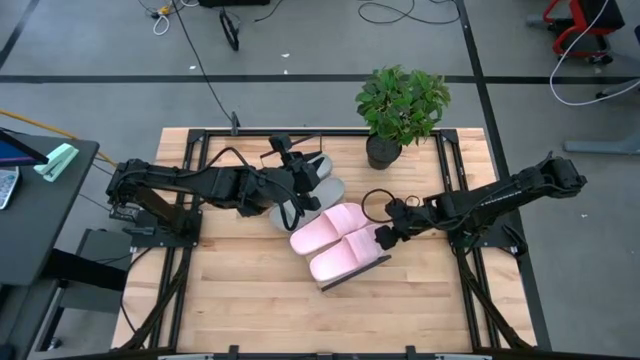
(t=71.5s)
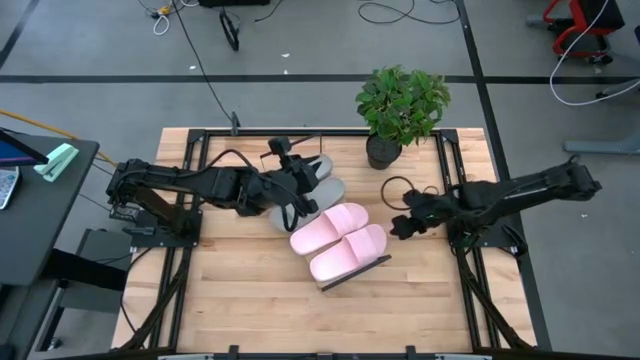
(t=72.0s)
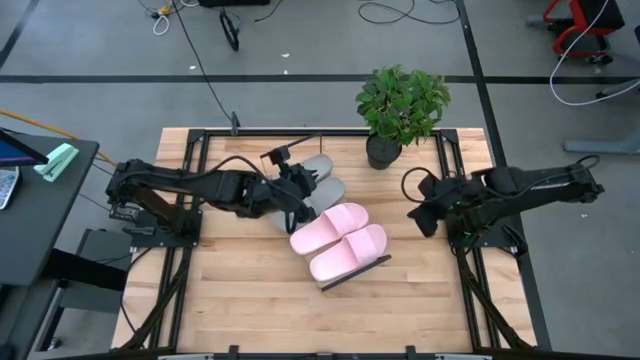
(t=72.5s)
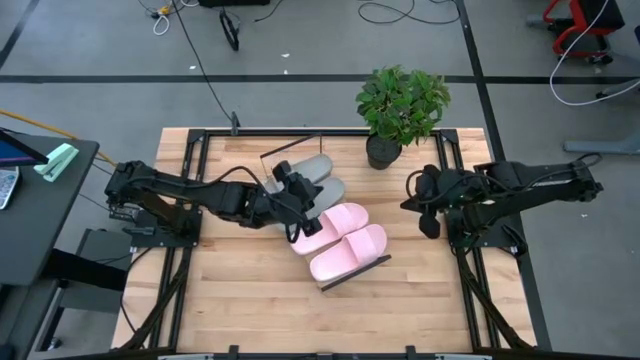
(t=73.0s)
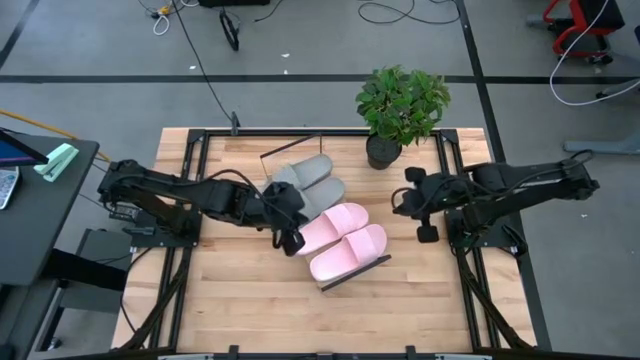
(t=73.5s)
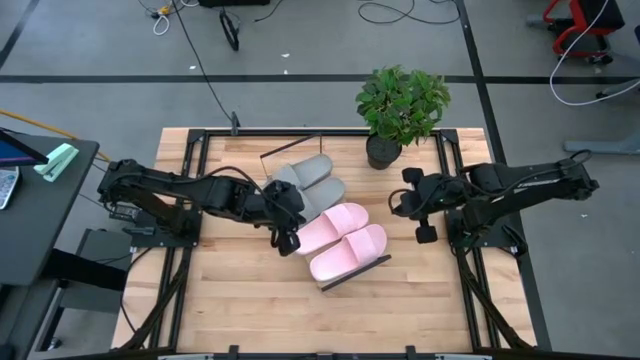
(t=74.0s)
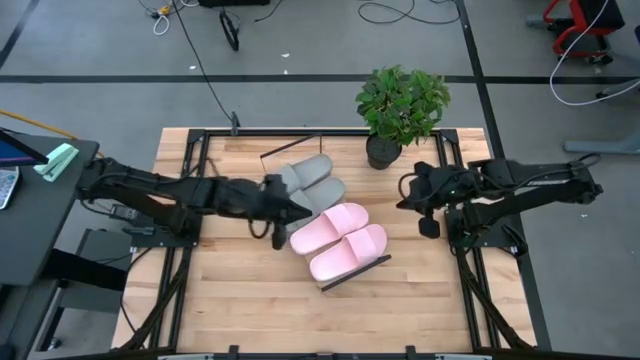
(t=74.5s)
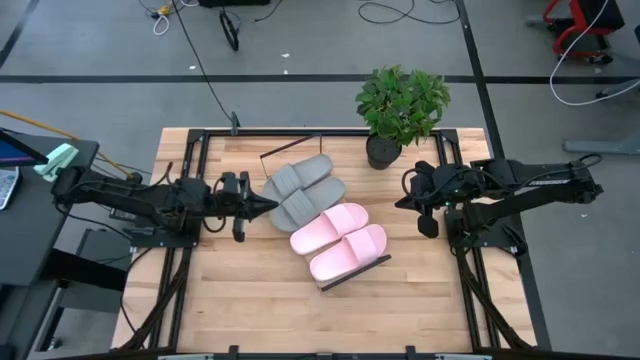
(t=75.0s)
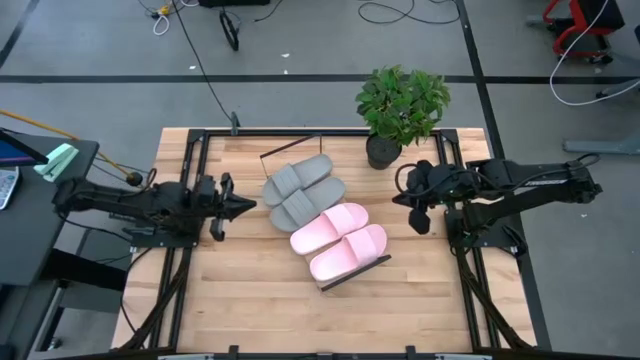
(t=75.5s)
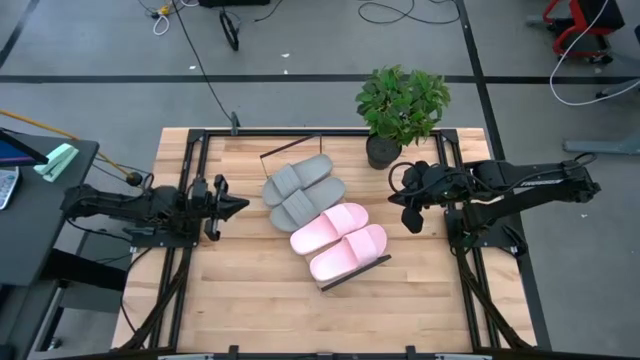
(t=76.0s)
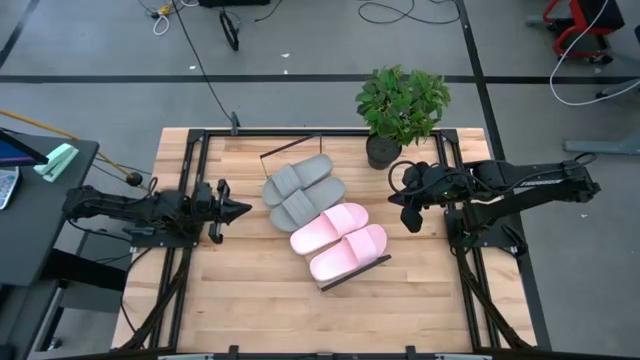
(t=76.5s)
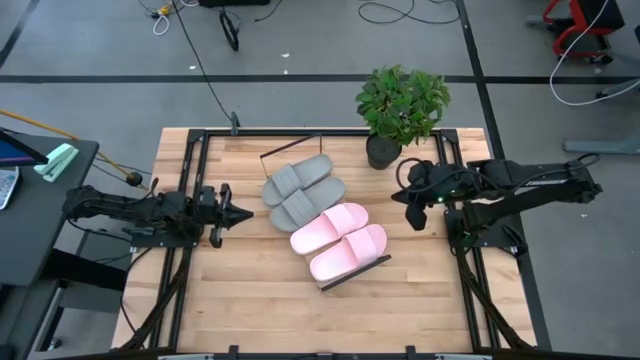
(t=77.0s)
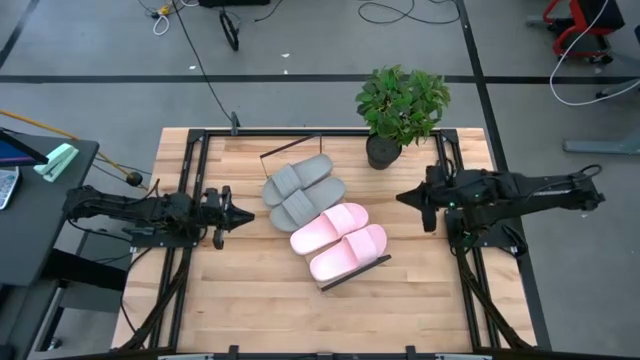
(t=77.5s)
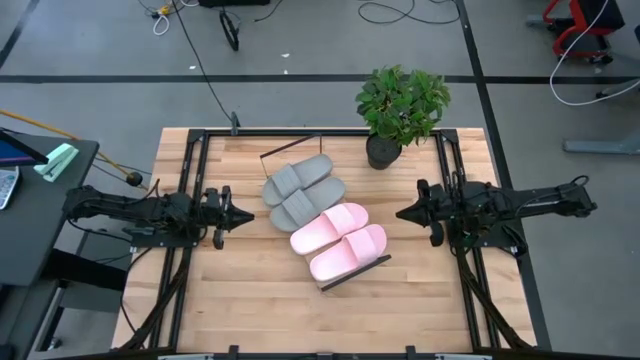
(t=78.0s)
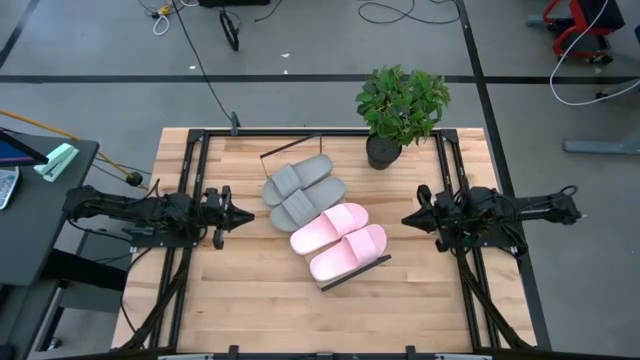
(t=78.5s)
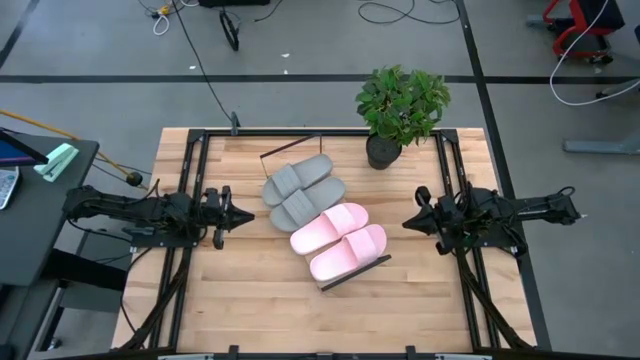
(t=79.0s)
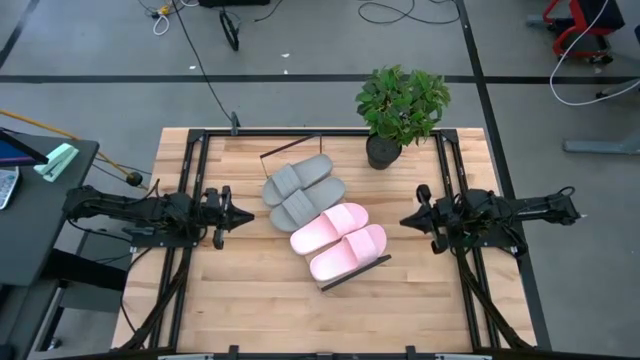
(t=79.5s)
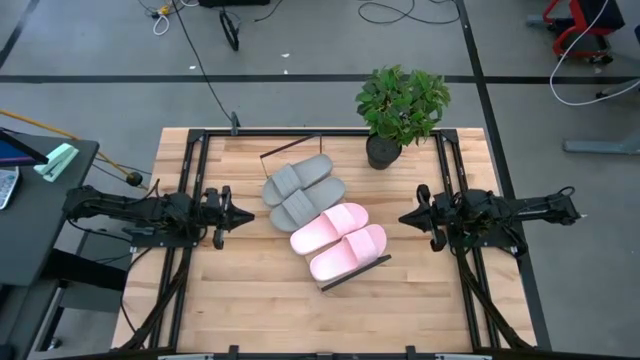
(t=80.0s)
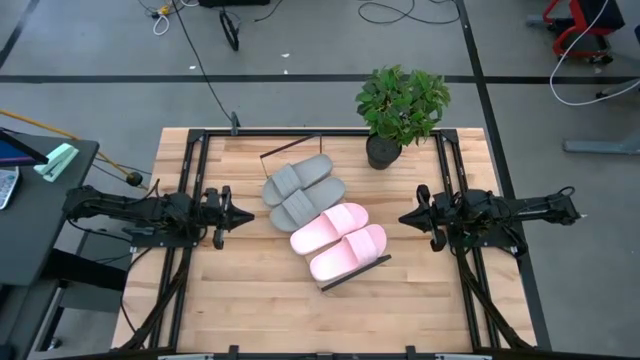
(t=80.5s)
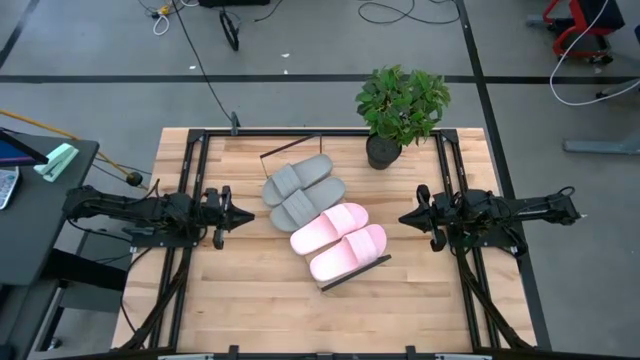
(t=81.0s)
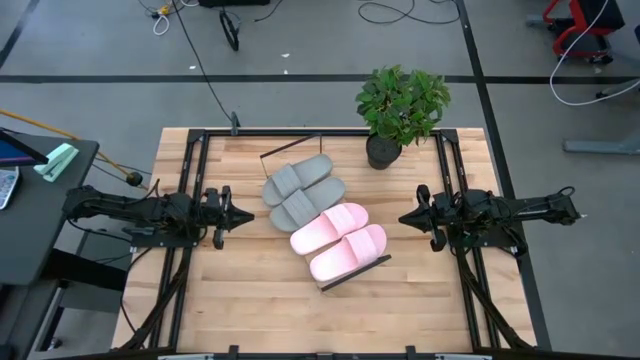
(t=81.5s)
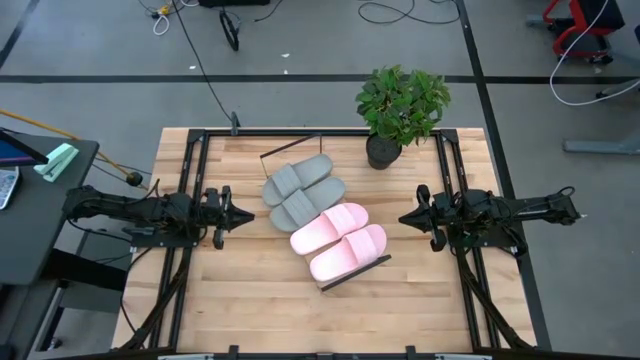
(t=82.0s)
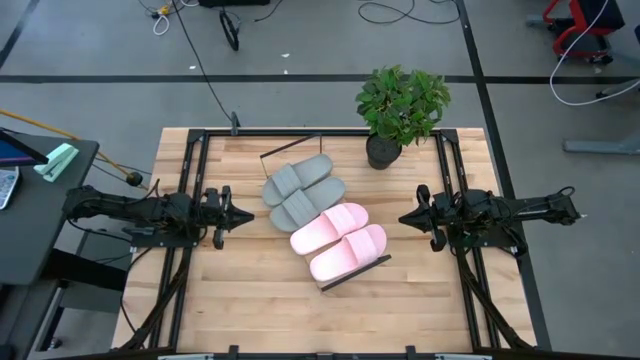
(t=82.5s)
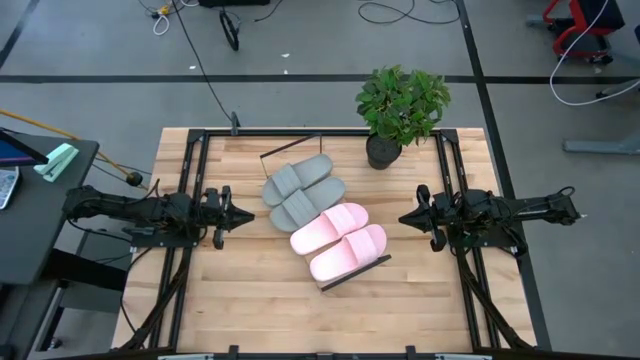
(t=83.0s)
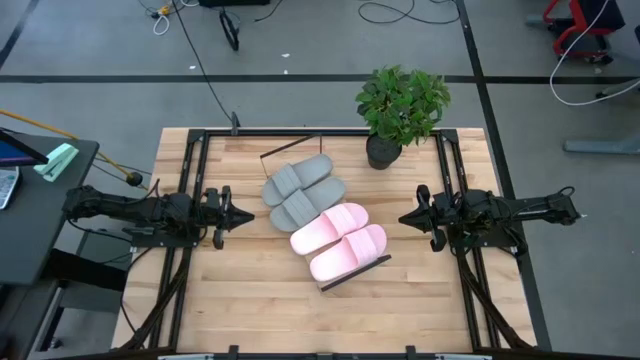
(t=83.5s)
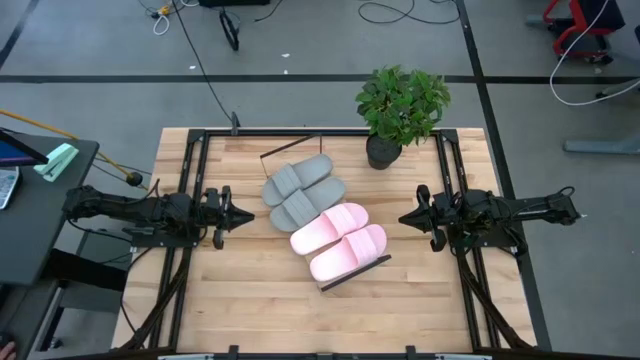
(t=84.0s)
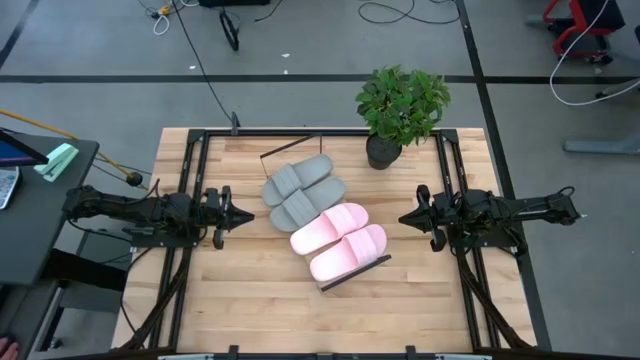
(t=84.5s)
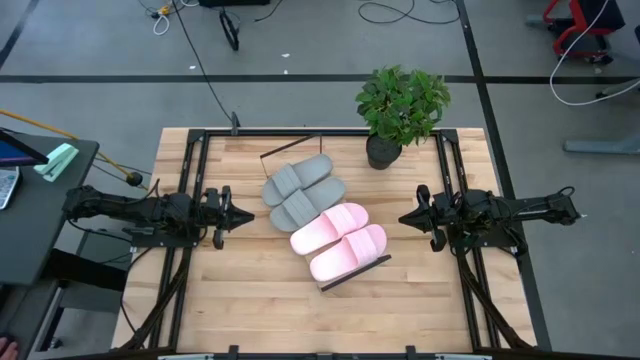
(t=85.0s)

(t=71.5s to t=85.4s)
Task: Pick and place slides into the shelf
Return to Home Position

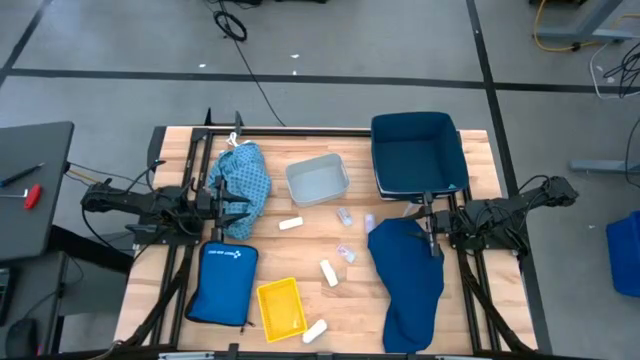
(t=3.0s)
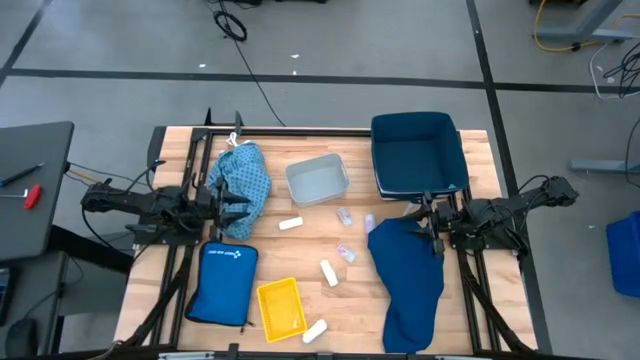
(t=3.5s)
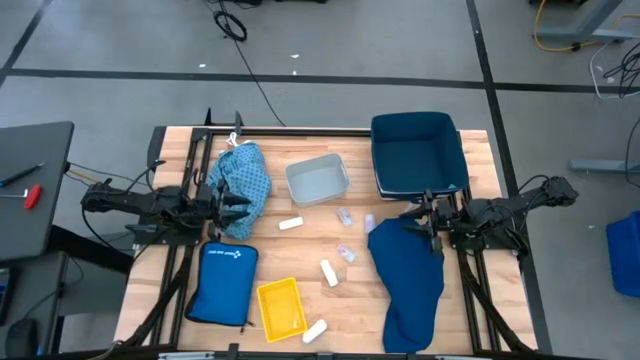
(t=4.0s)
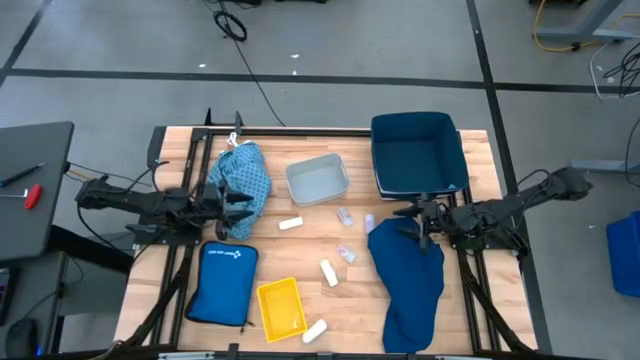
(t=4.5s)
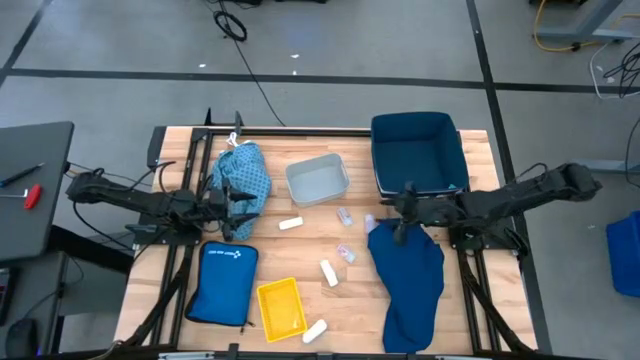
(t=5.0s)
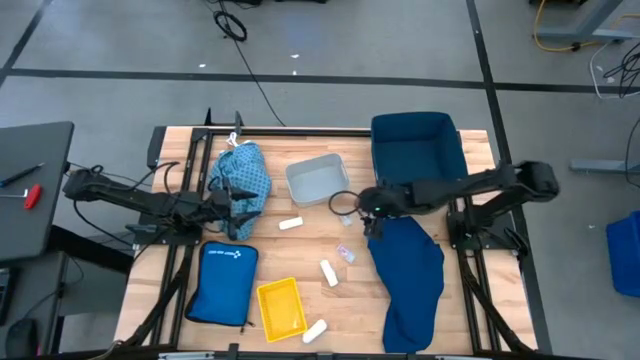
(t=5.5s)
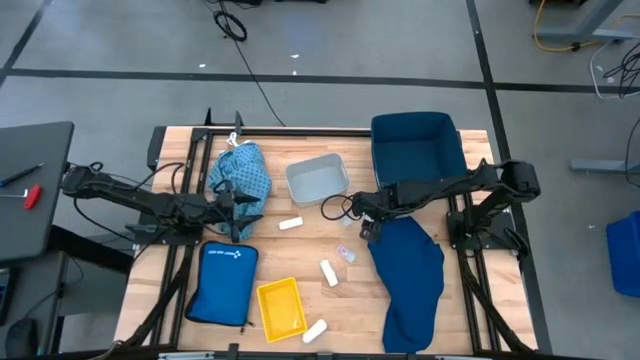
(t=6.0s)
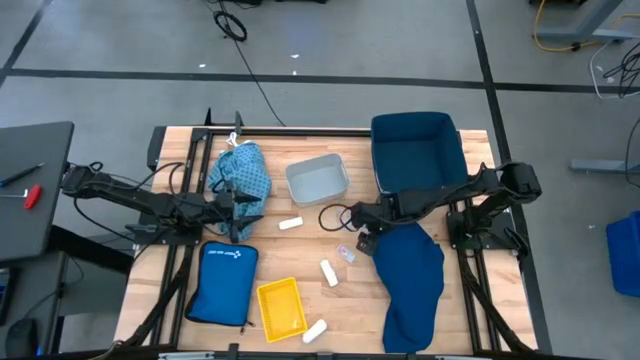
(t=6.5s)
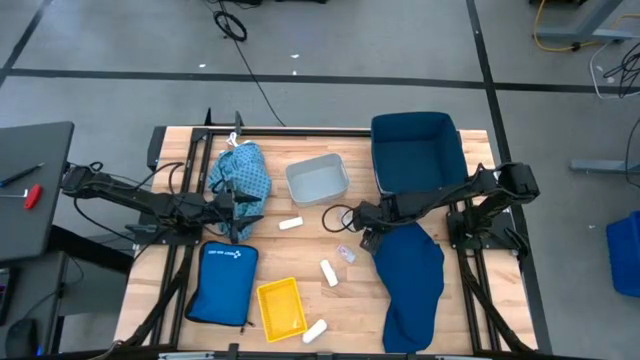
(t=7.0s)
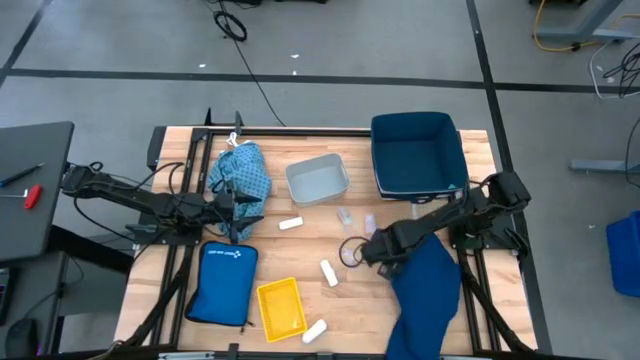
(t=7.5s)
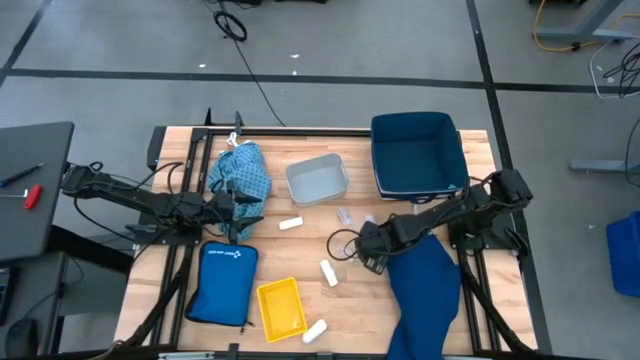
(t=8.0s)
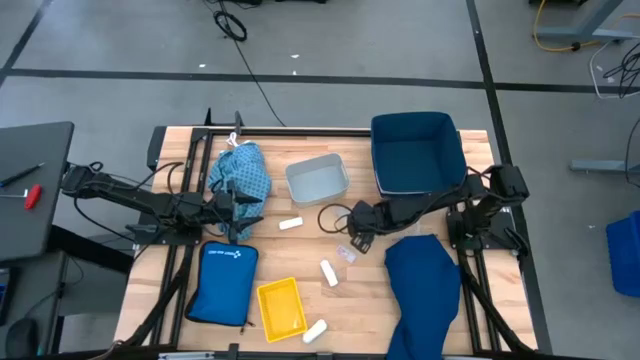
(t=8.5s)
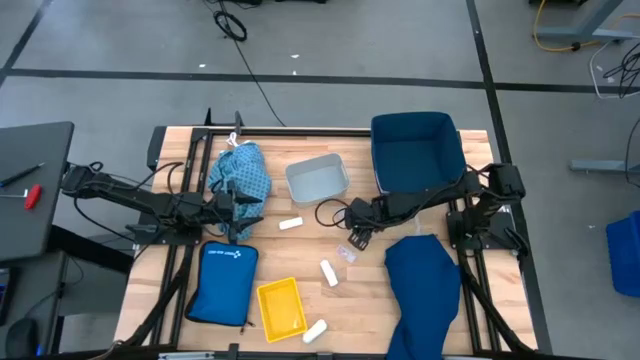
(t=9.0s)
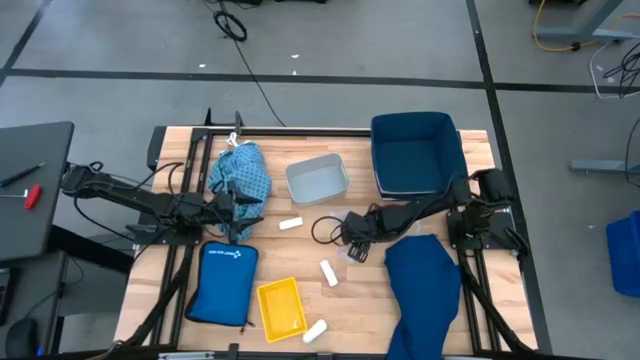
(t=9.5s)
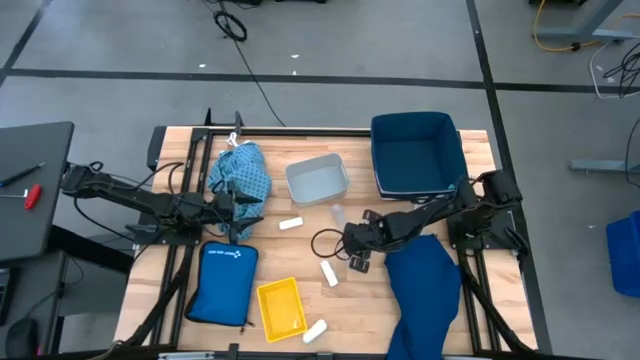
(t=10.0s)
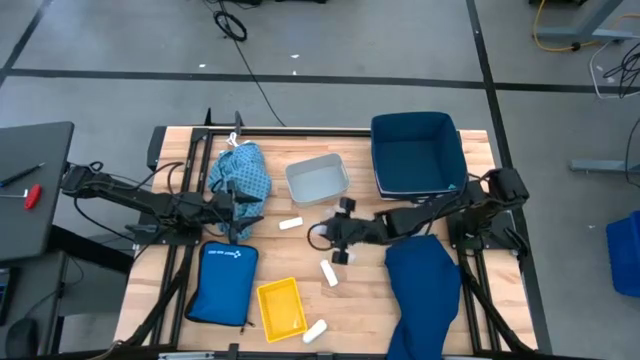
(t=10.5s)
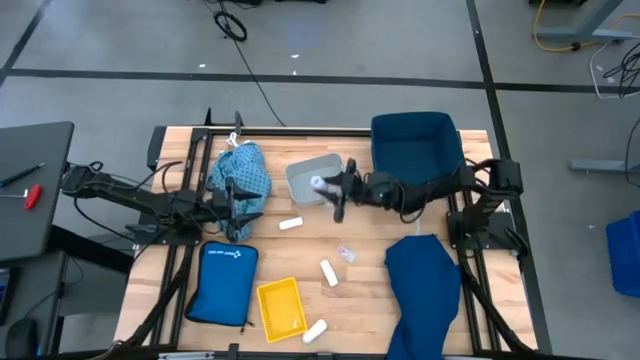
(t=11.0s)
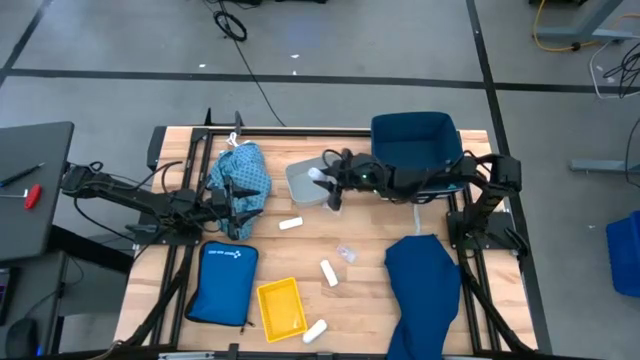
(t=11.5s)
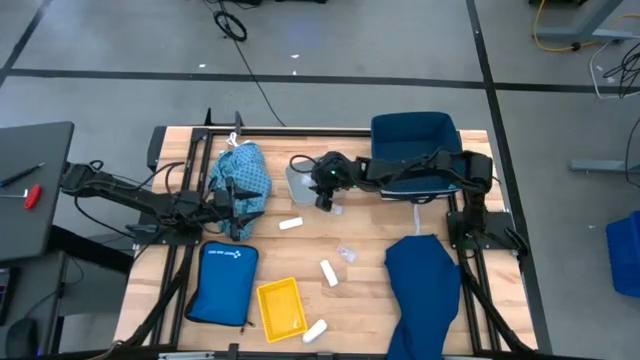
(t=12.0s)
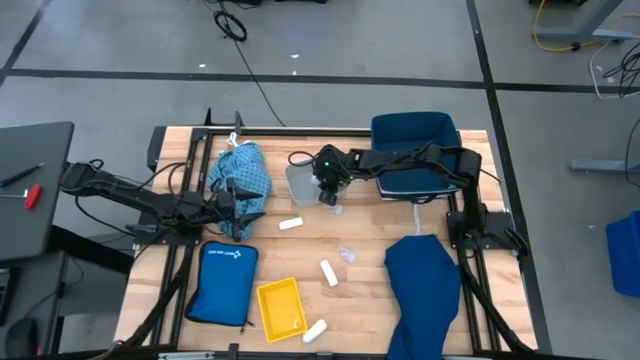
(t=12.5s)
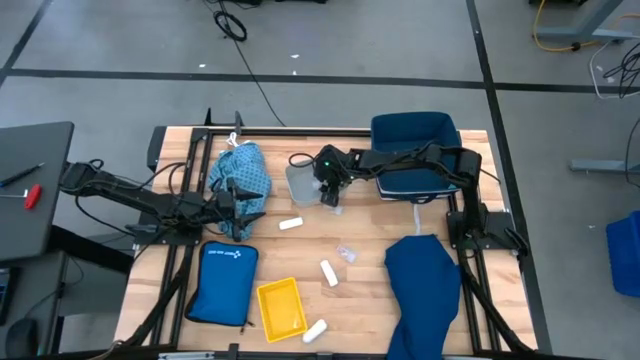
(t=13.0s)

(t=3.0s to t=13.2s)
Task: Pick & place medical supplies in basket/bin
Put the white pill bottle into the white bin
